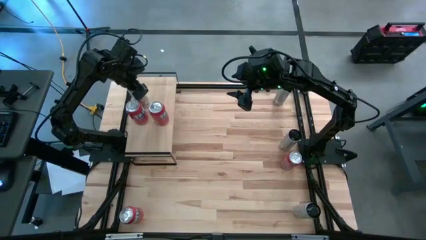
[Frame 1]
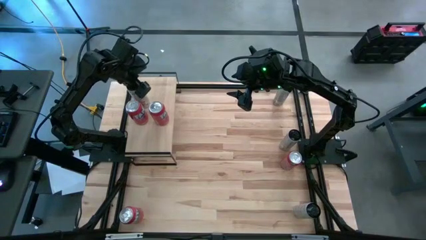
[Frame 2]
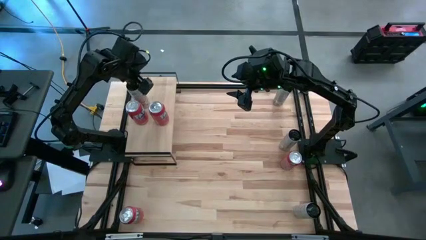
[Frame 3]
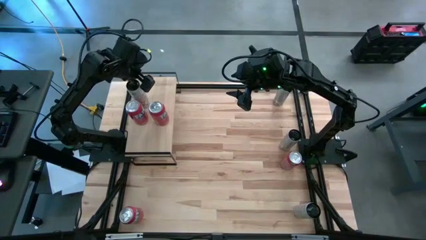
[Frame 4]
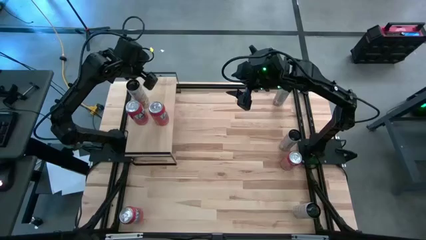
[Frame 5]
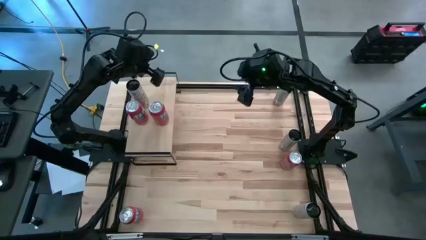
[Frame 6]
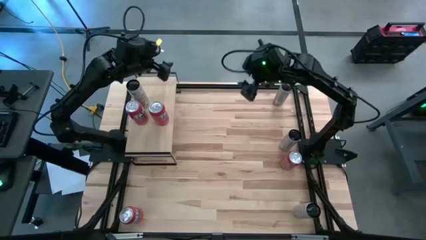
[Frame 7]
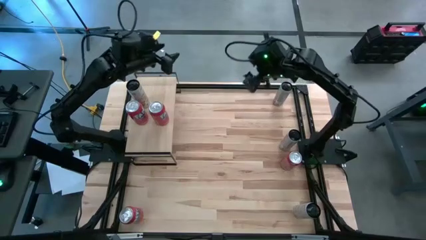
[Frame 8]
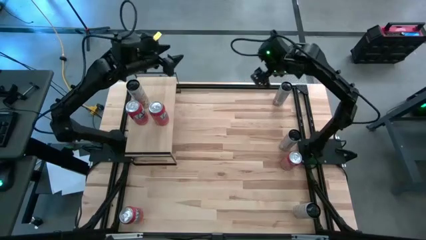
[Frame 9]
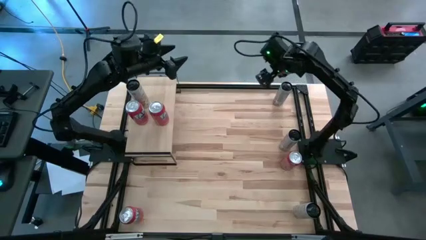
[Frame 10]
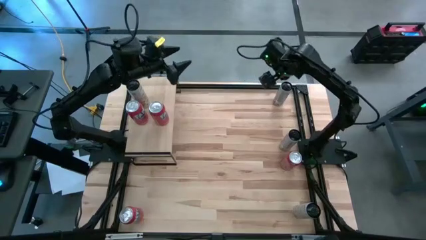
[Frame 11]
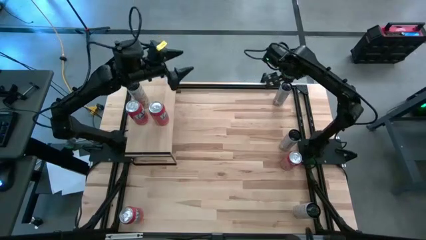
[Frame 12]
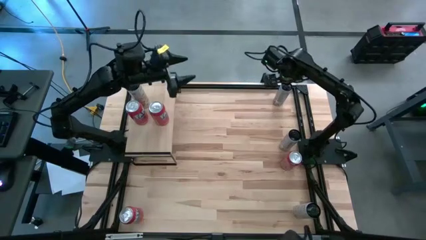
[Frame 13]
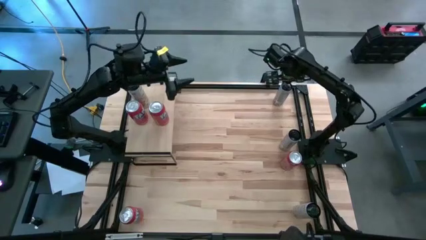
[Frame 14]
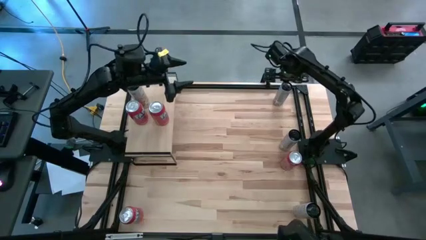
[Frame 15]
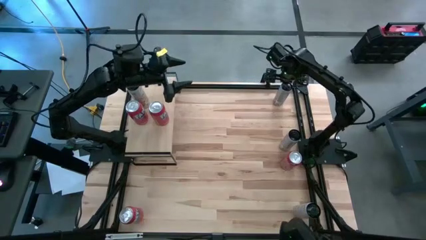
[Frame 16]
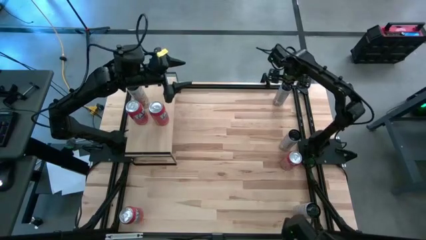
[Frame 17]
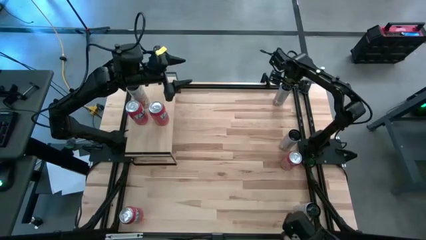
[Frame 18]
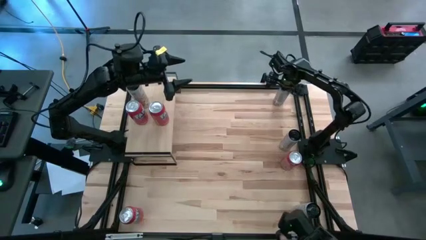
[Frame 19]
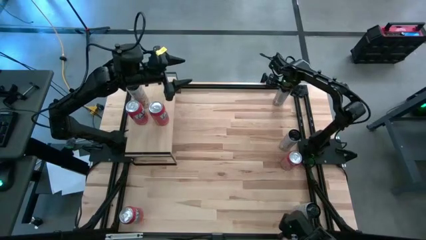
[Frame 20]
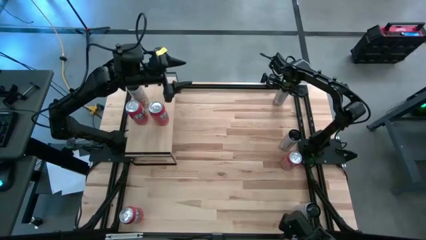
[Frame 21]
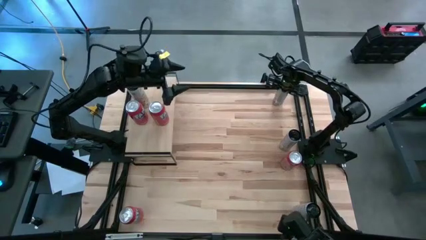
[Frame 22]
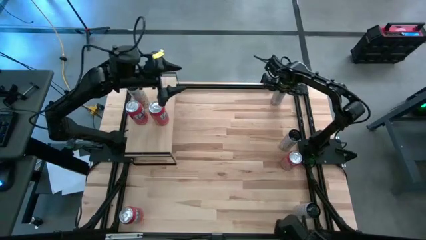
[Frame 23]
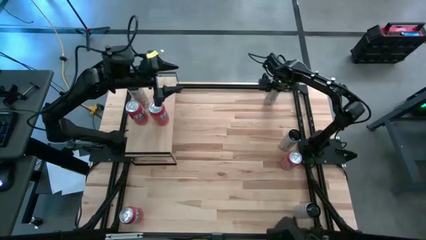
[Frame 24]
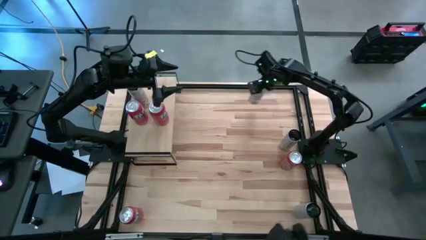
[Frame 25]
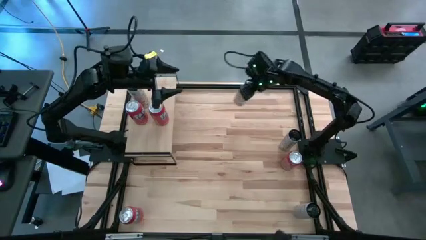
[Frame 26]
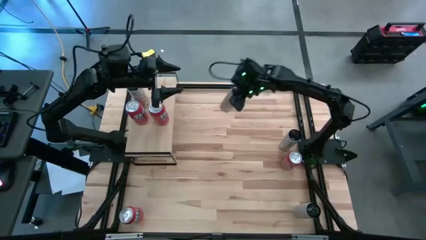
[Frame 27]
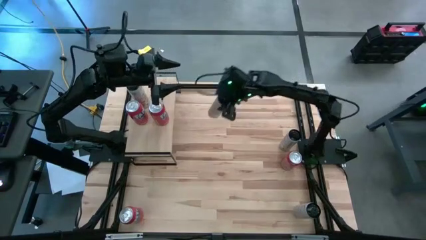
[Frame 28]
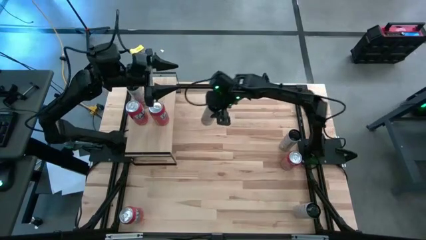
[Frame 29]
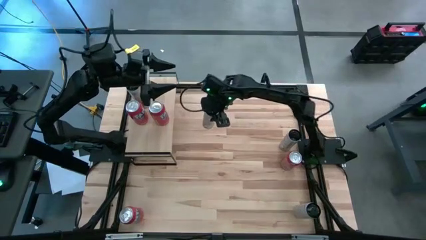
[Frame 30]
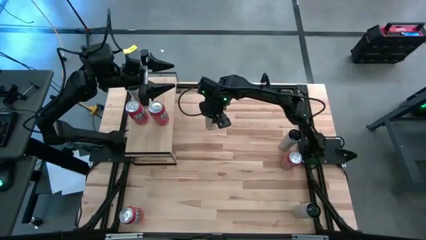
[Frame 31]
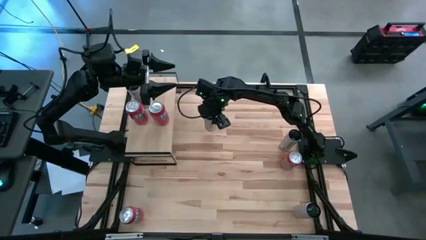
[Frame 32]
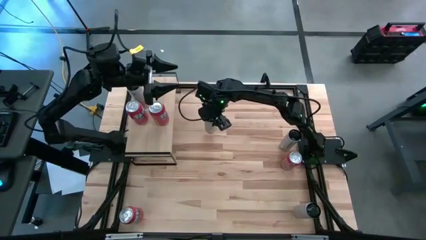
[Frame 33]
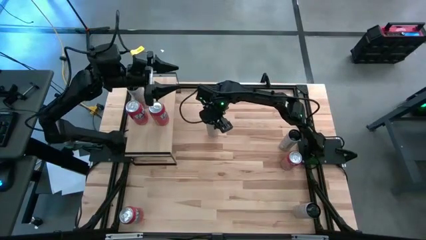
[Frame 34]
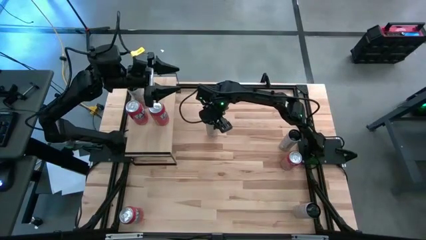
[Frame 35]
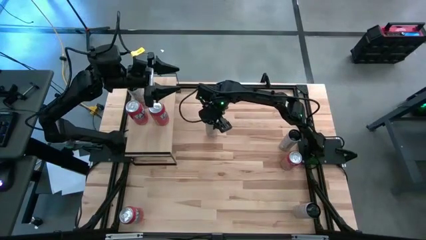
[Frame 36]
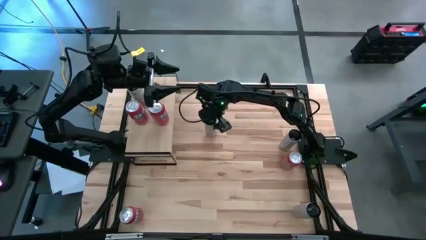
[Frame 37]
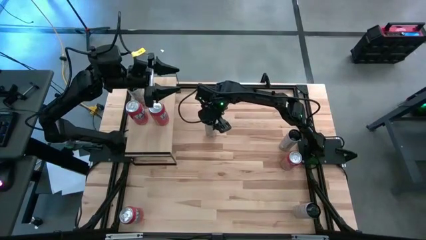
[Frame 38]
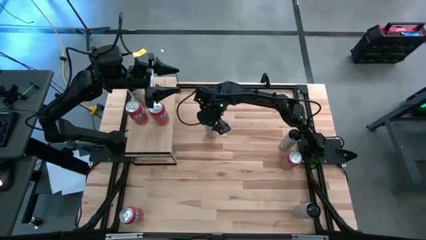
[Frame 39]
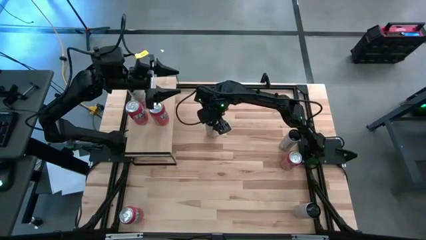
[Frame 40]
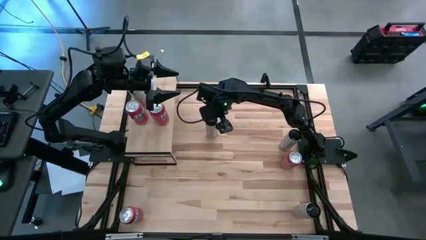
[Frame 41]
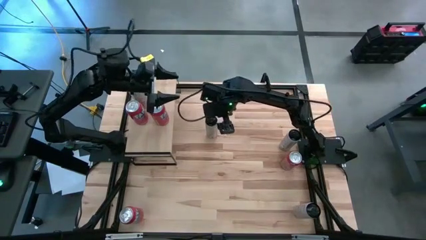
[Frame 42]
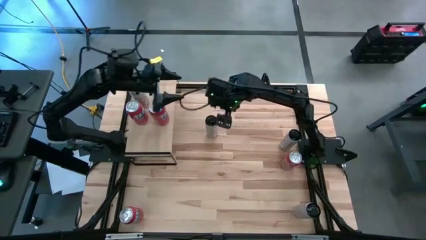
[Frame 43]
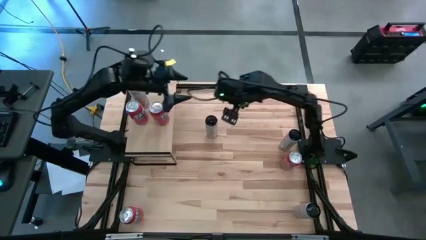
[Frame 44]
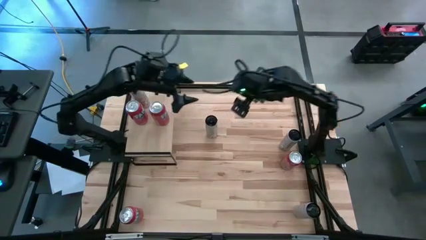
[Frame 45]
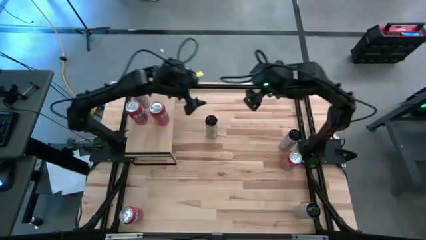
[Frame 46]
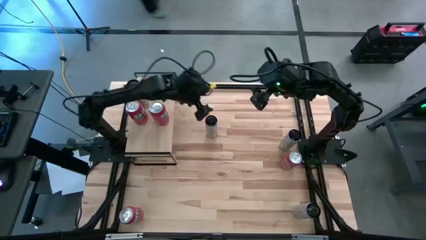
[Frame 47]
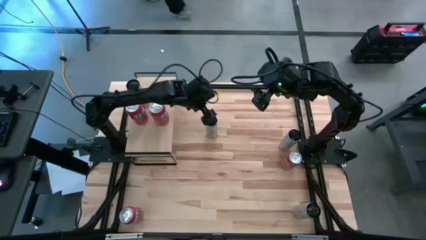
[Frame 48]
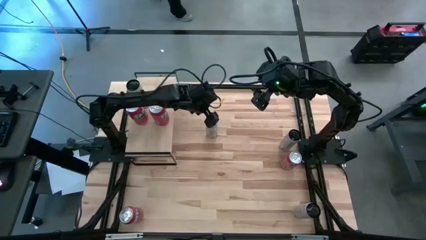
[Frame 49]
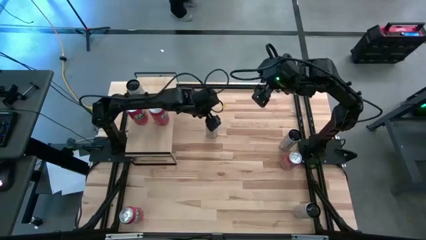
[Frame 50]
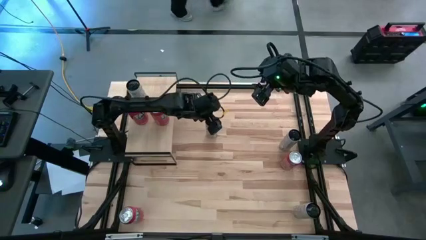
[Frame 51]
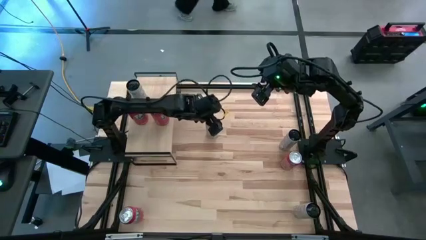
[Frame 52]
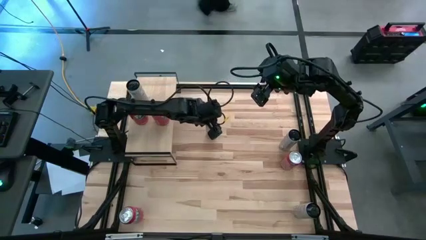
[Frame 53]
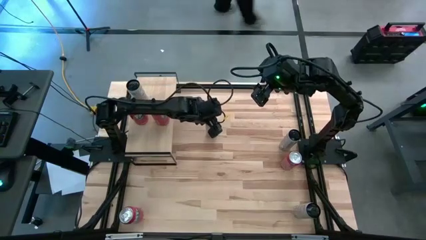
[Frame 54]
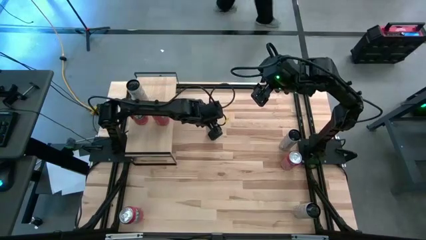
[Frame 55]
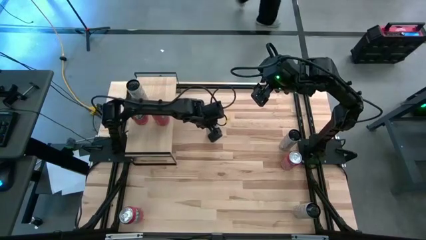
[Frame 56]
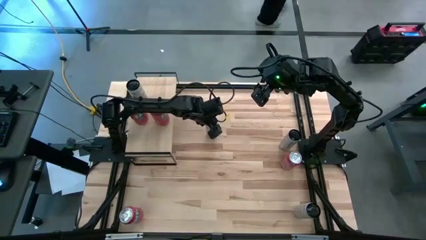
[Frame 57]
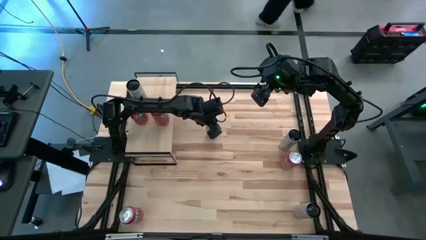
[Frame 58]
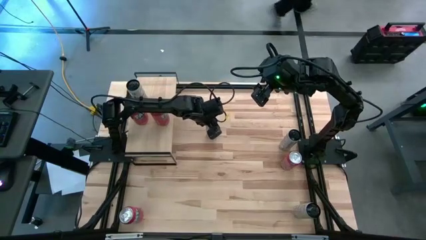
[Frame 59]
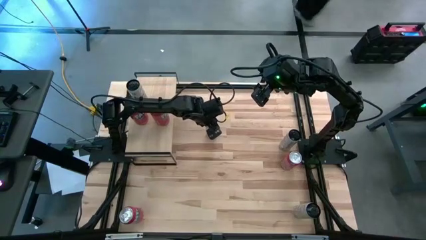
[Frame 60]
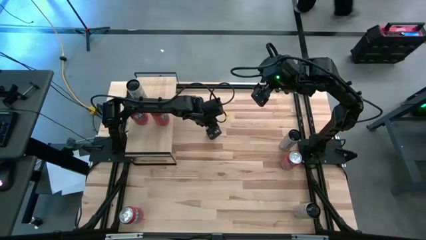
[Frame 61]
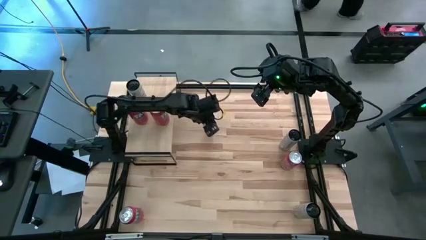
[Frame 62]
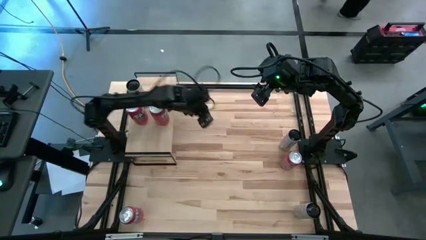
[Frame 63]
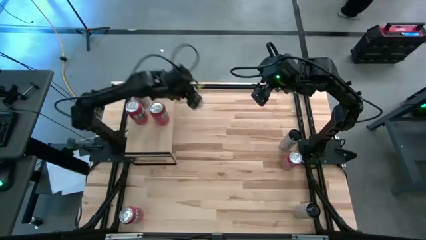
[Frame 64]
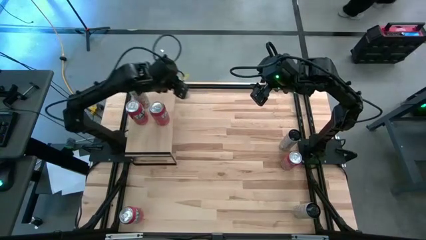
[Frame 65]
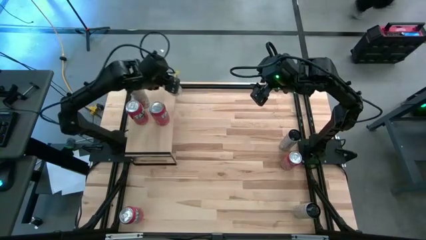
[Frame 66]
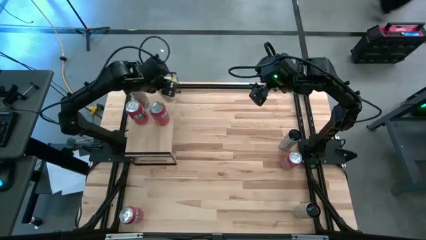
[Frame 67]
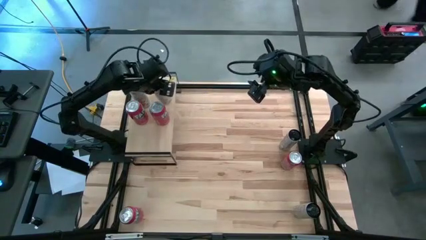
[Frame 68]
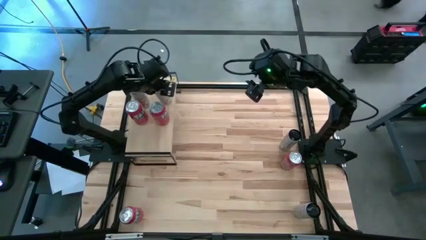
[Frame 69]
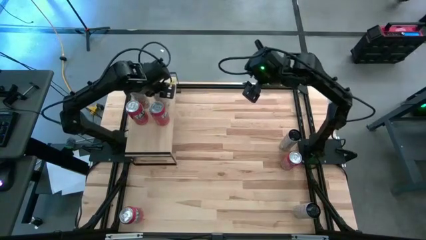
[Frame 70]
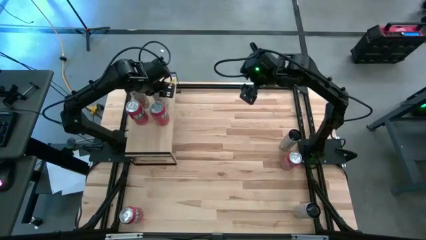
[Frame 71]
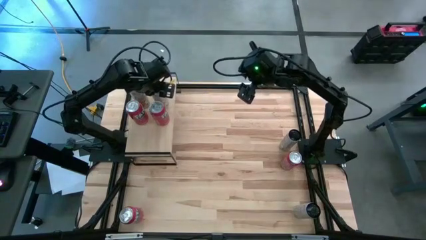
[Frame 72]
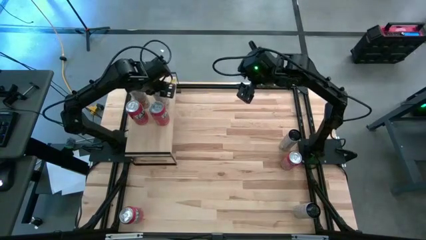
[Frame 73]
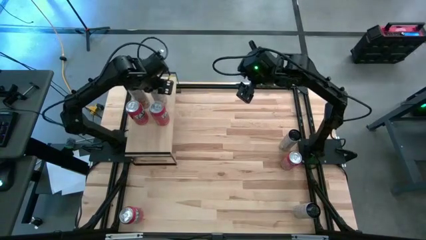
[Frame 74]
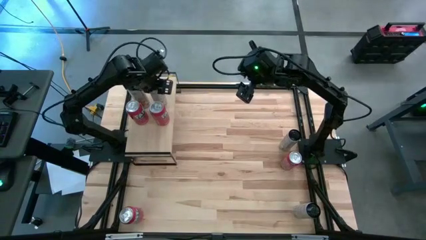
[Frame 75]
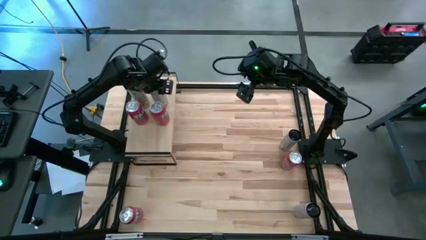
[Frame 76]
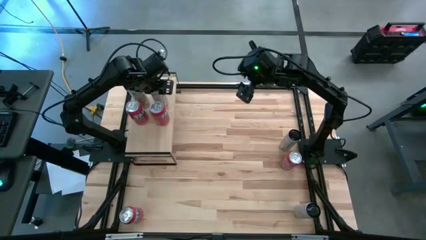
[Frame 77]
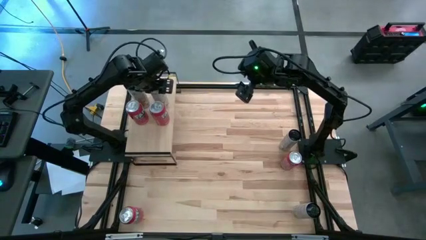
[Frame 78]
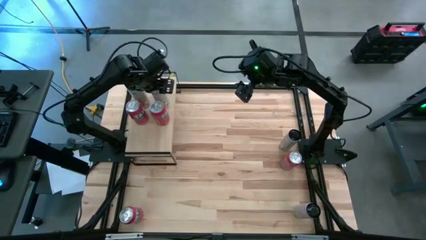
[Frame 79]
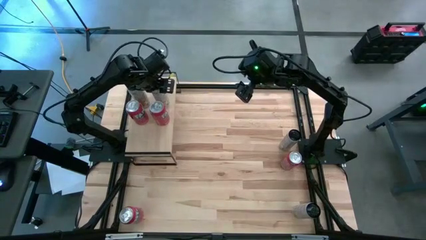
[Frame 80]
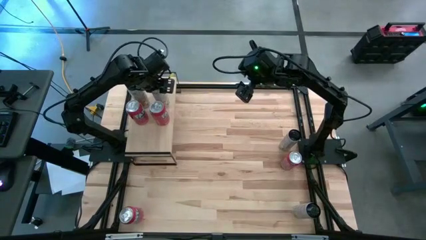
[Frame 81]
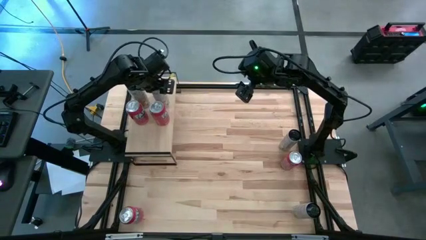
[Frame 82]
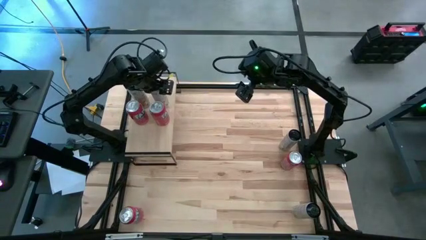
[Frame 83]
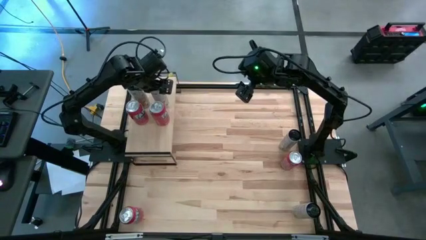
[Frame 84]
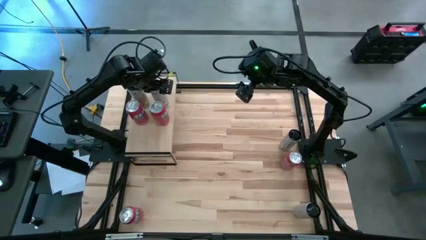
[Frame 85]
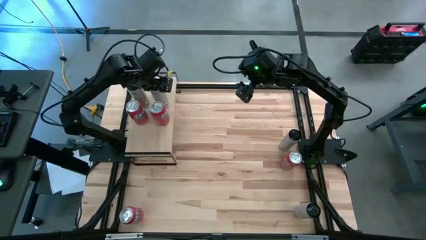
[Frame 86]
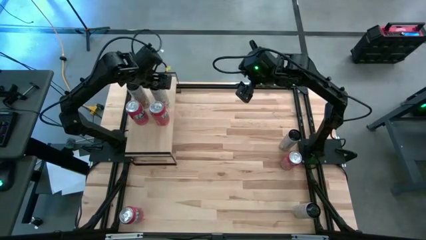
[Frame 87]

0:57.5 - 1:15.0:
Task: Place canned beverage on shelf
Put the top white yellow soda can on the shelf aligned with the other white yellow soda can
